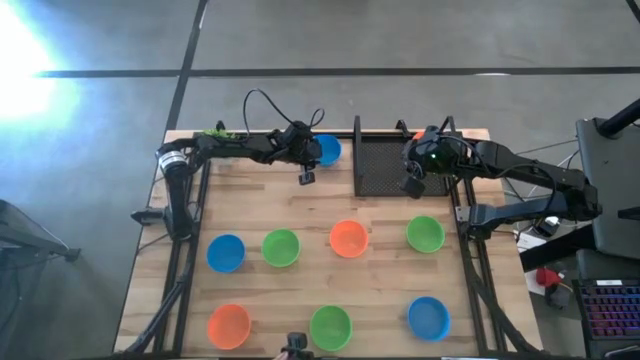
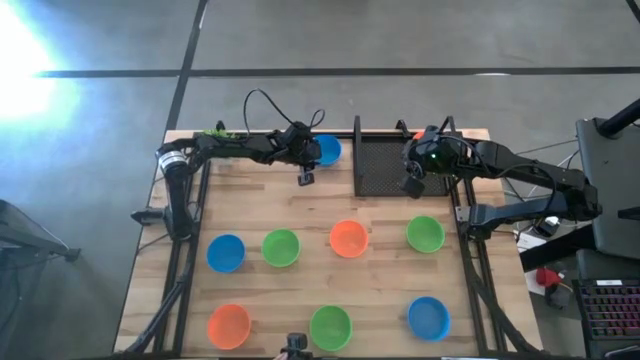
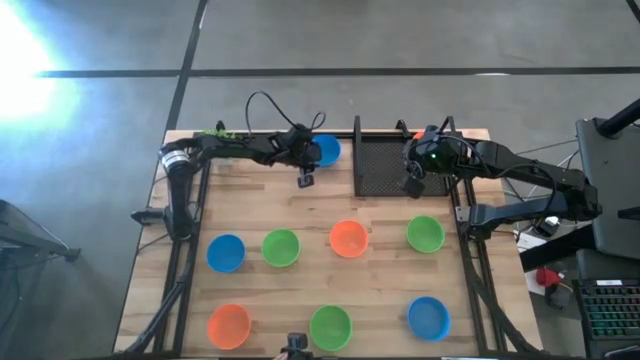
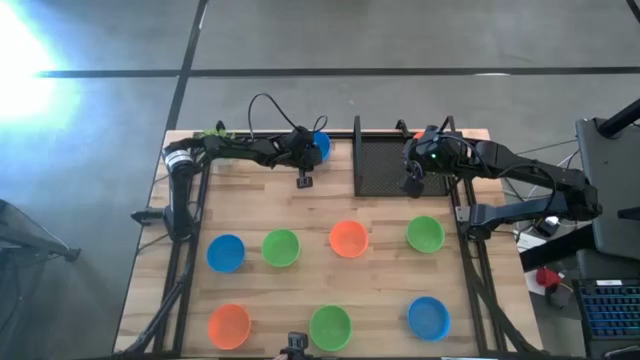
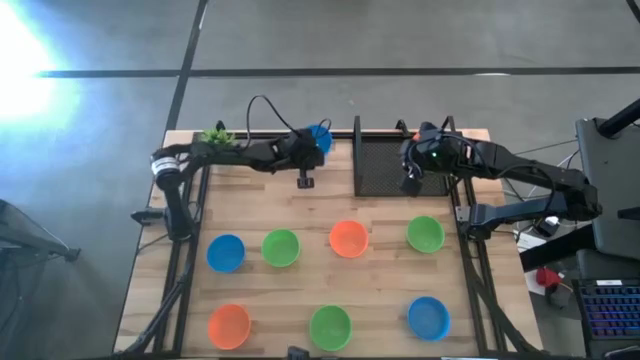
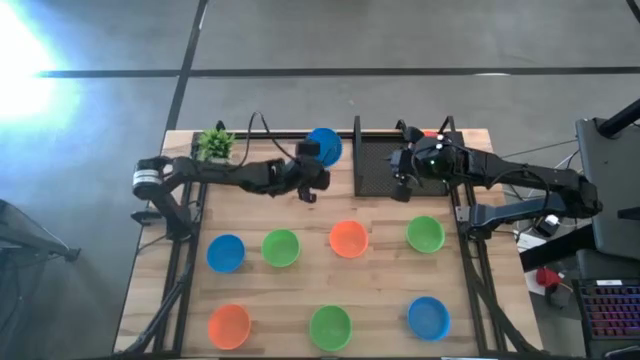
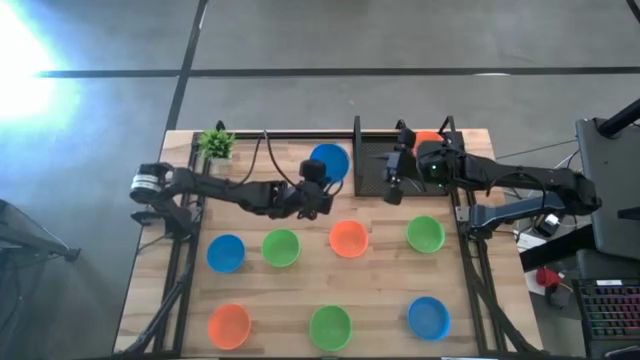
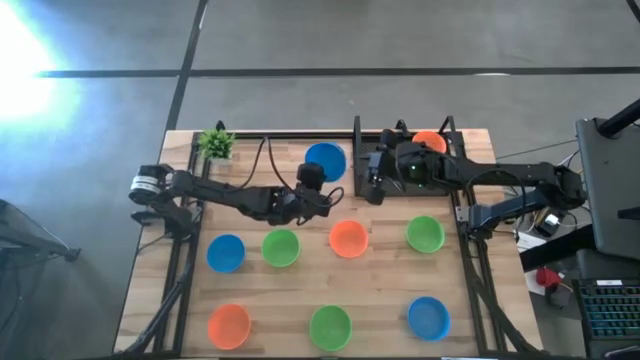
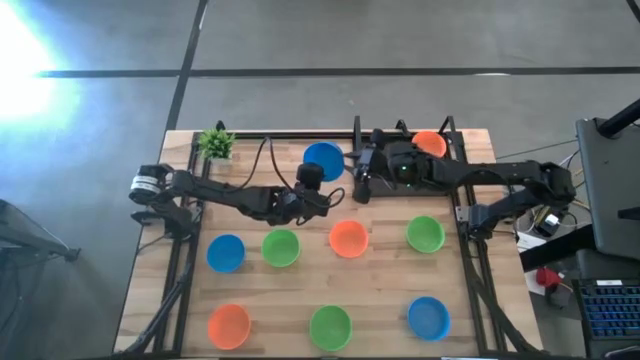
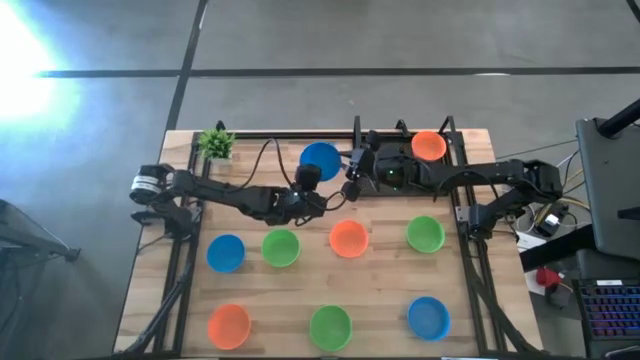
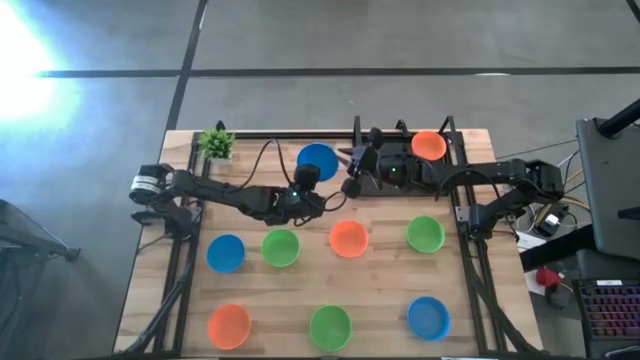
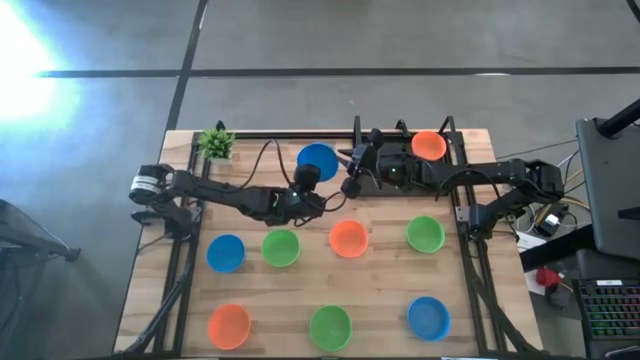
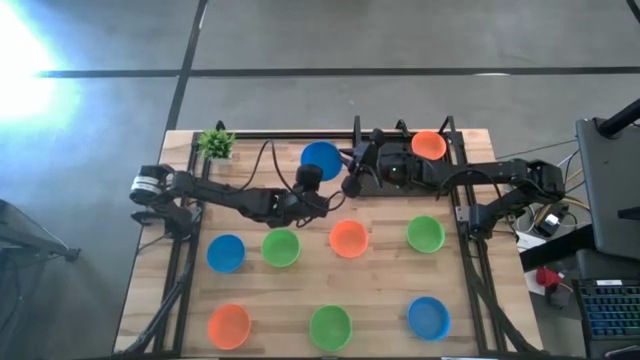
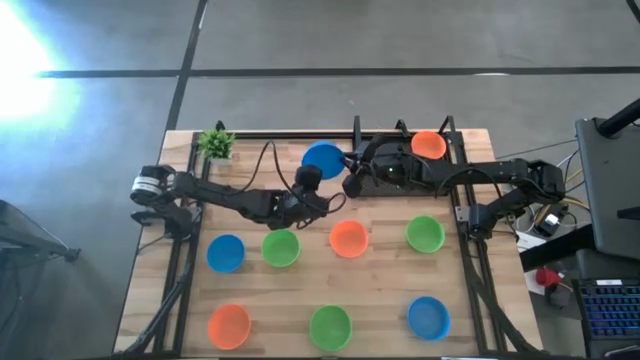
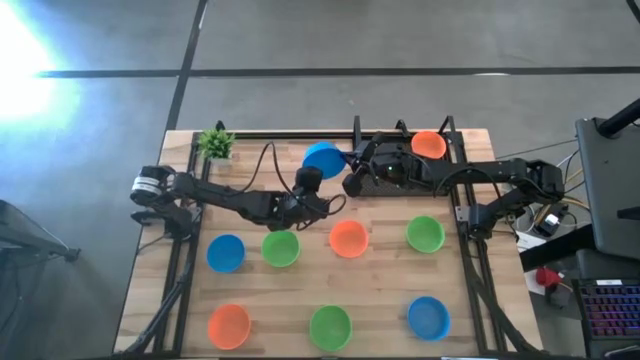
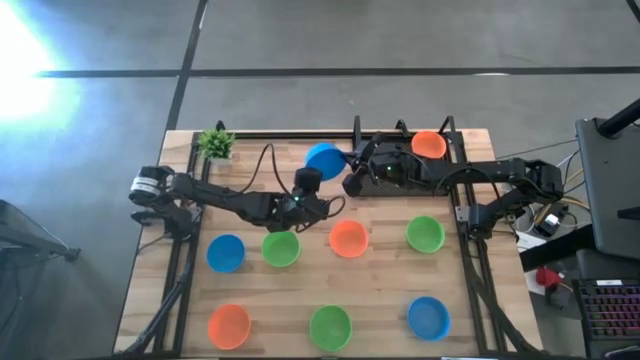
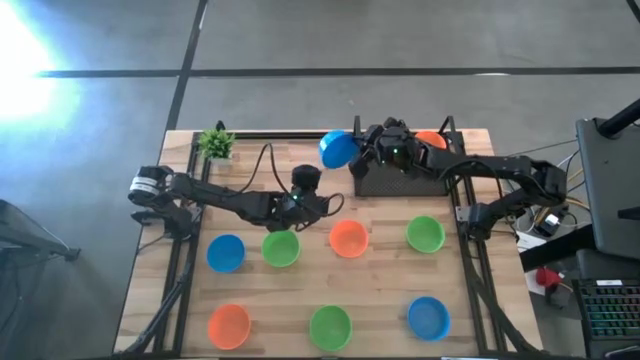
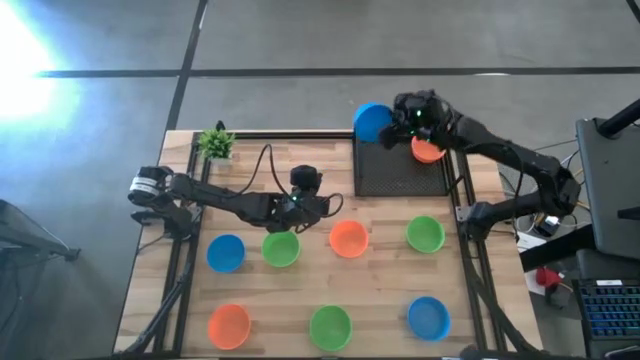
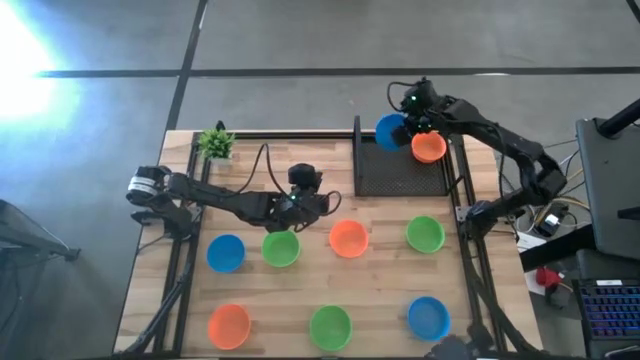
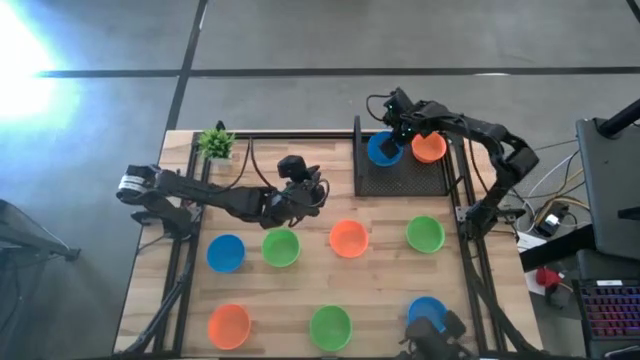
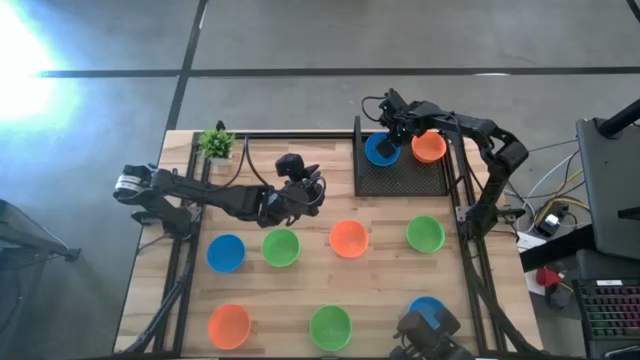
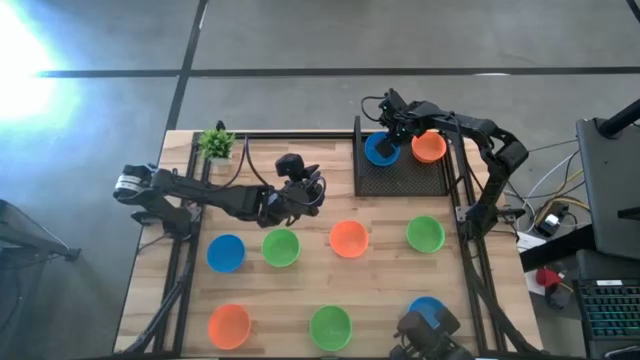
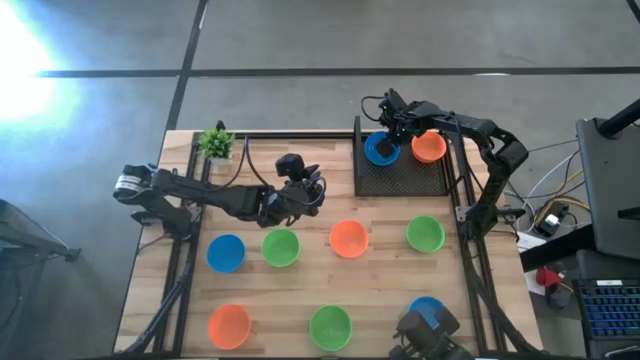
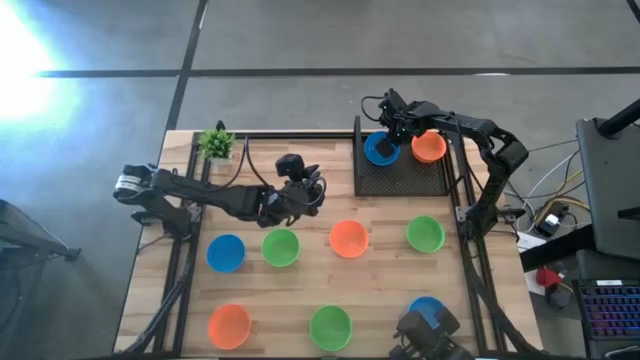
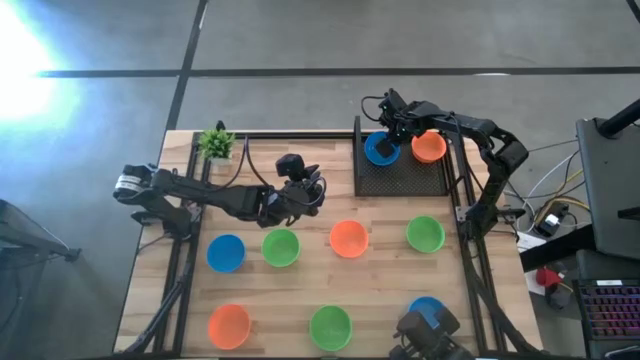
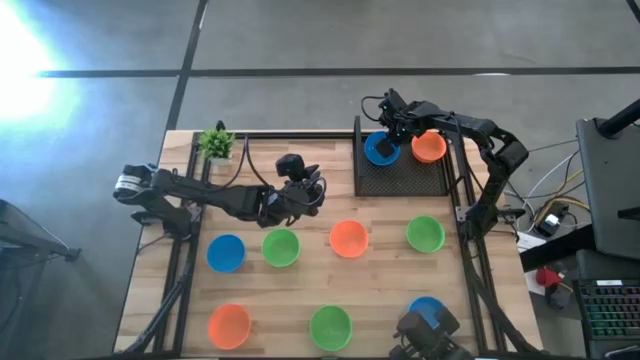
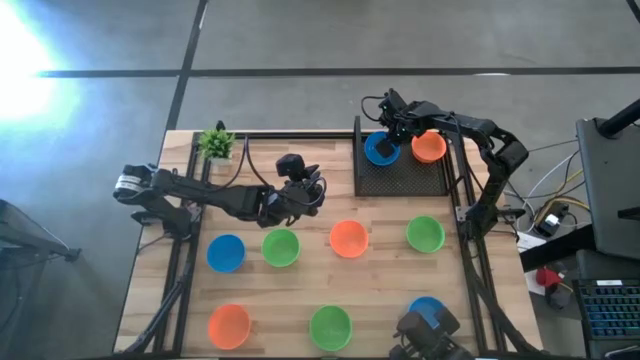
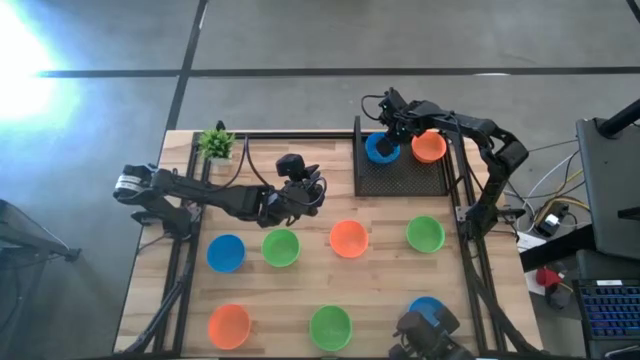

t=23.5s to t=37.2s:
Task: Pick & Place Mini bowls
Put the top blue bowl on the shelf

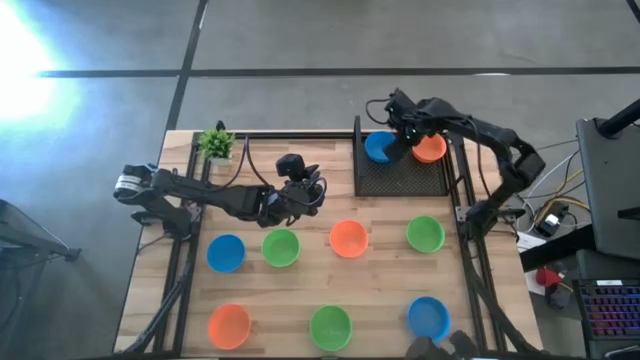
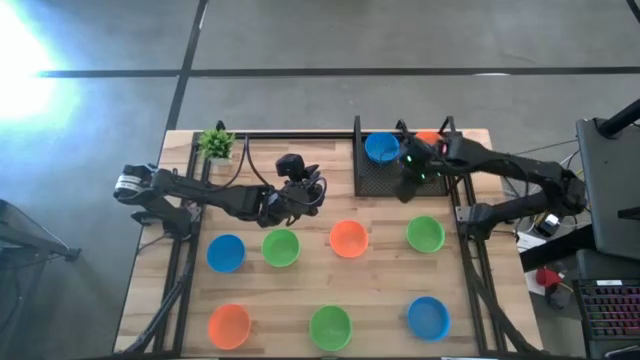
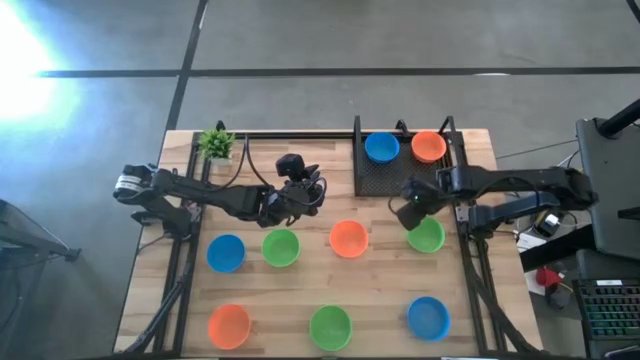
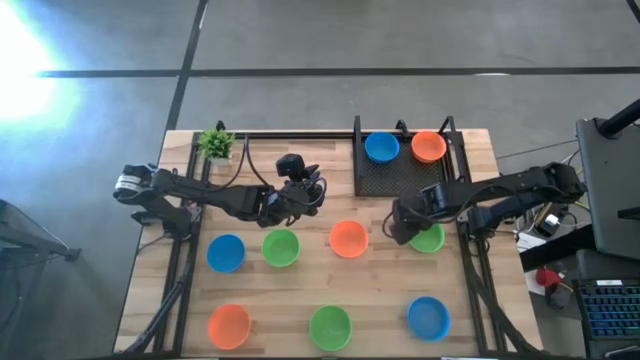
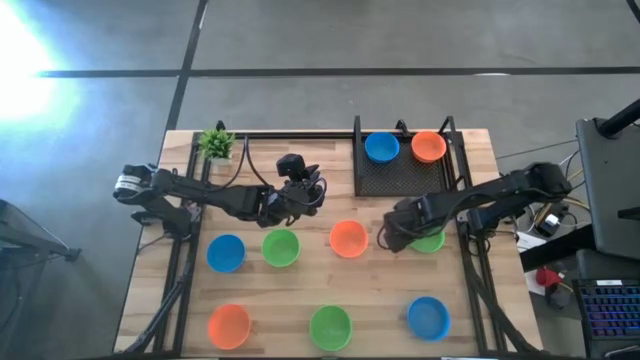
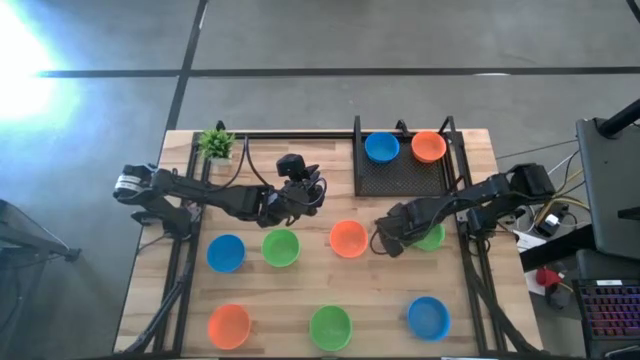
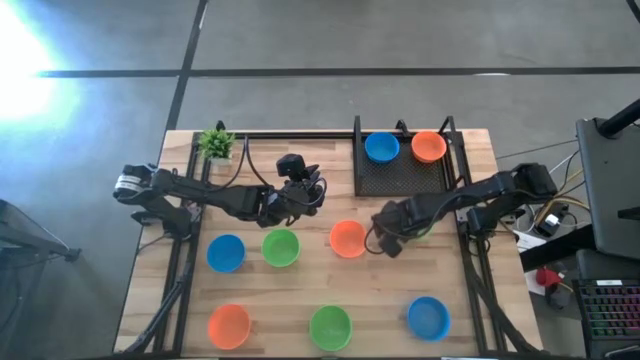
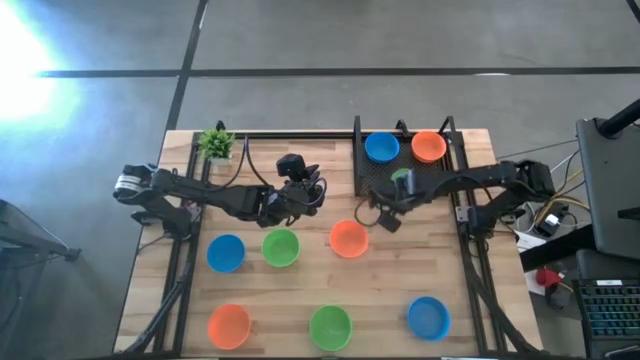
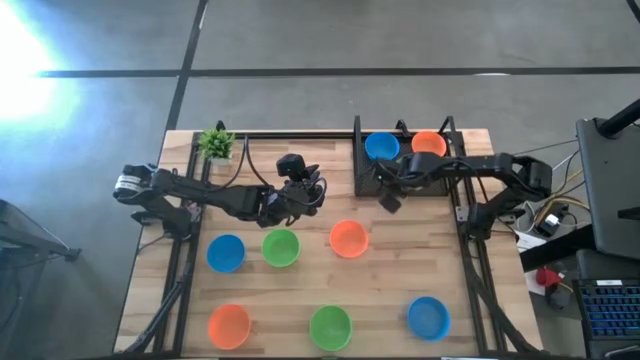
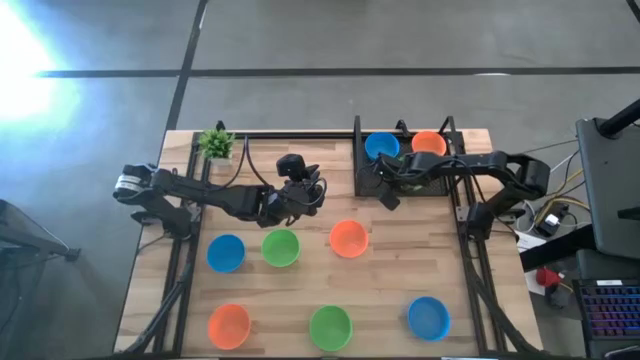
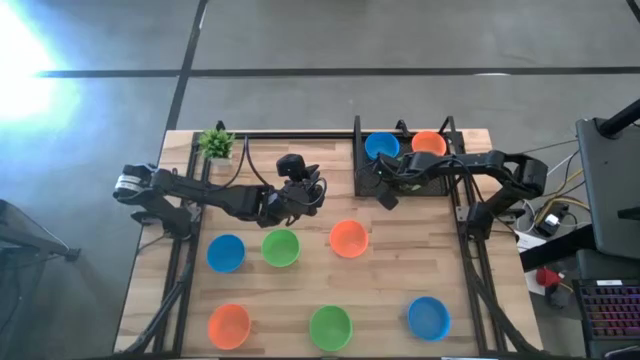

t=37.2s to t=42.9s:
Put the top right green bowl on the shelf

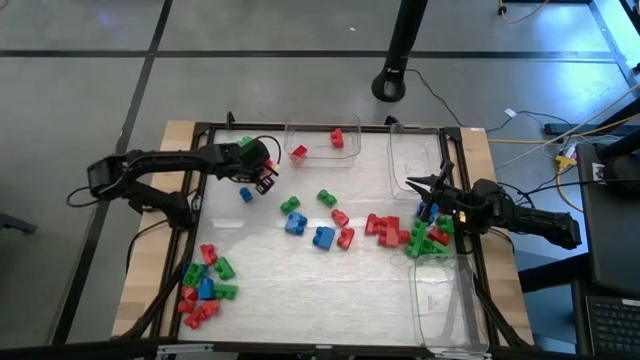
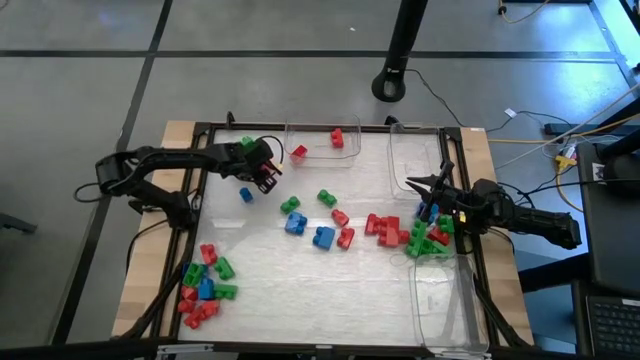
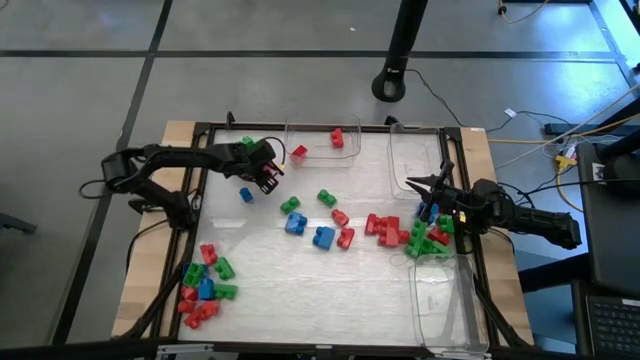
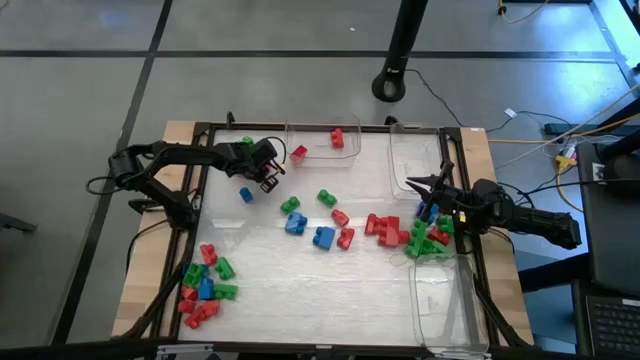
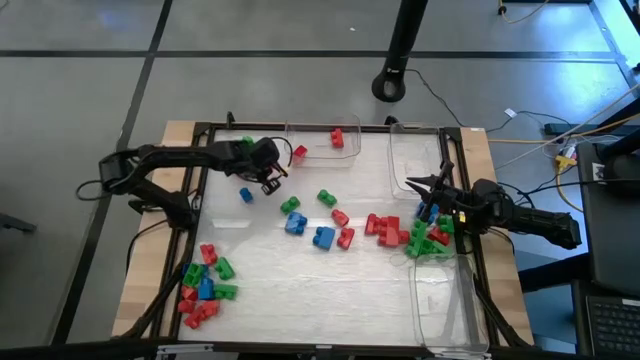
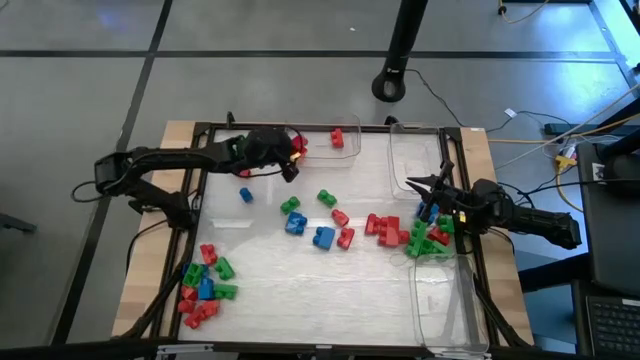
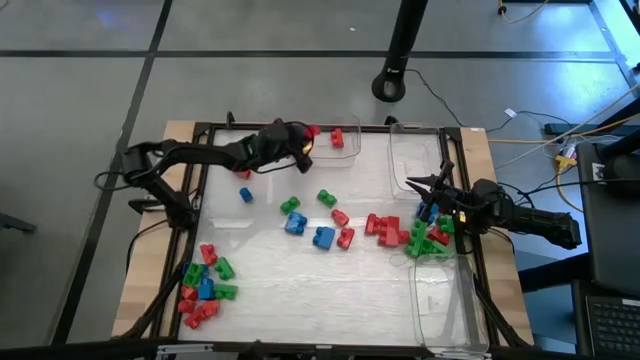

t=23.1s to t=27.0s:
Task: Sort blocks
Put the red game piece into the top left transparent bin
